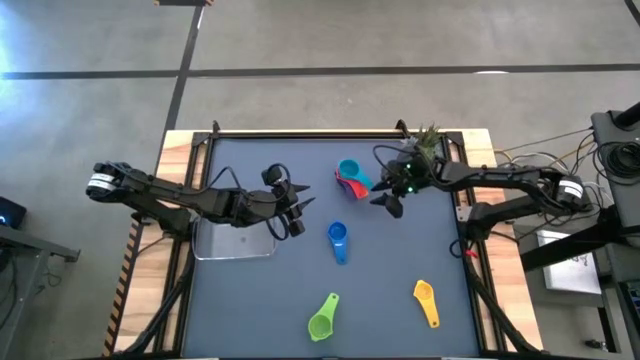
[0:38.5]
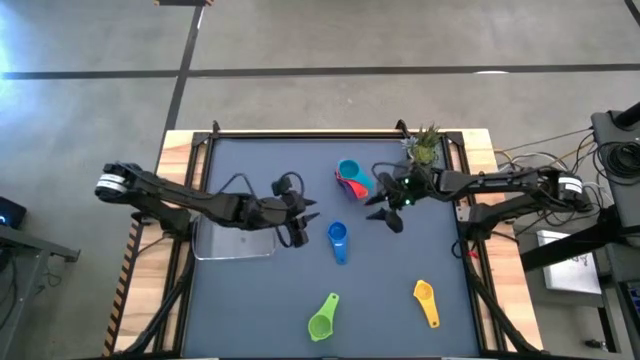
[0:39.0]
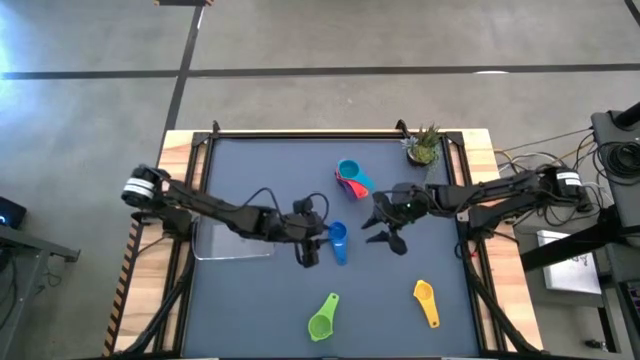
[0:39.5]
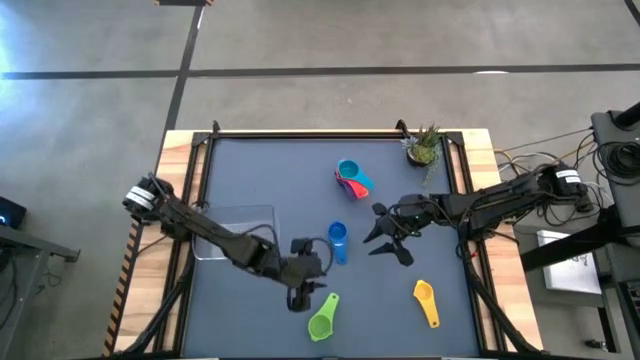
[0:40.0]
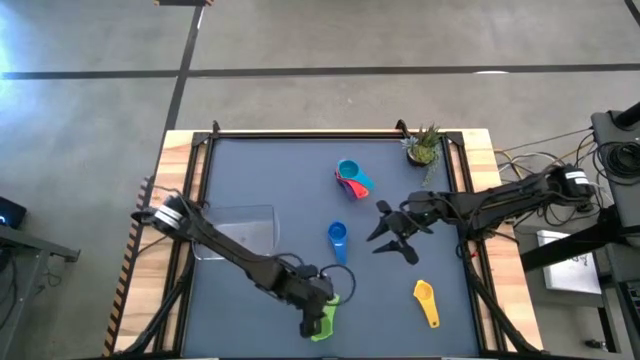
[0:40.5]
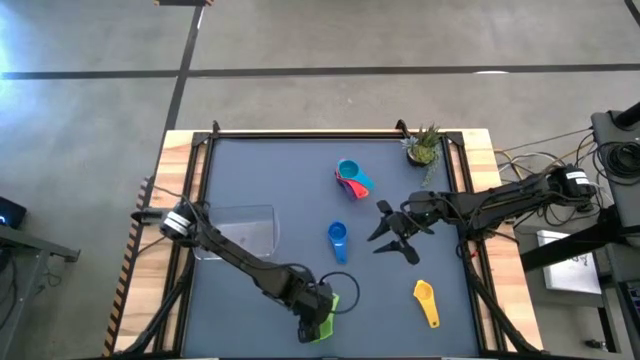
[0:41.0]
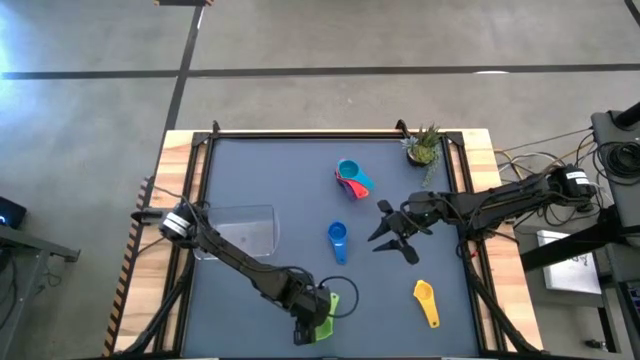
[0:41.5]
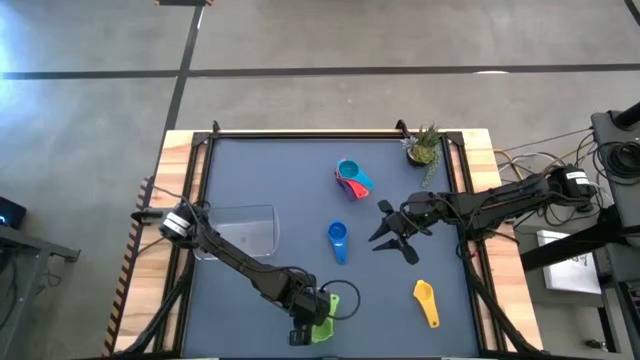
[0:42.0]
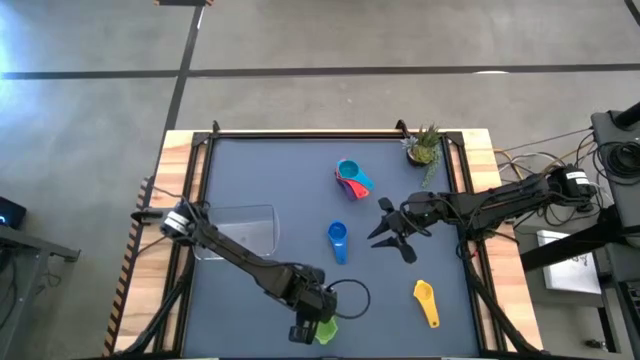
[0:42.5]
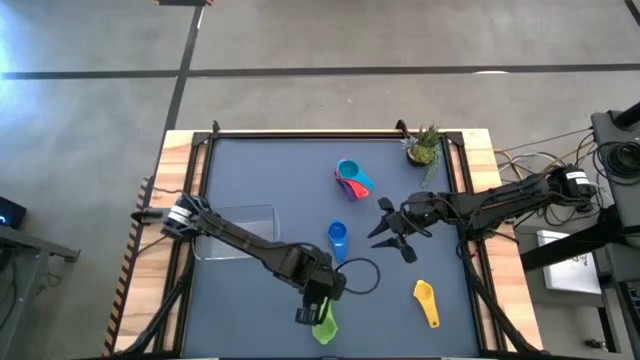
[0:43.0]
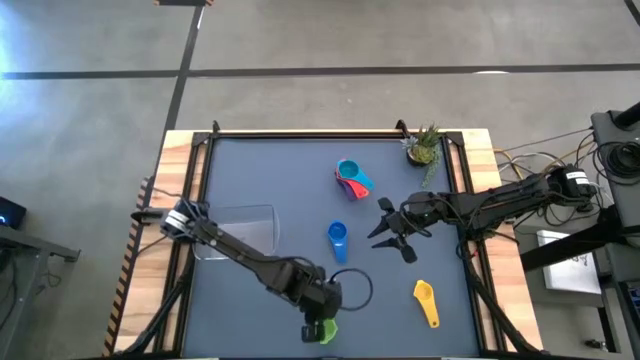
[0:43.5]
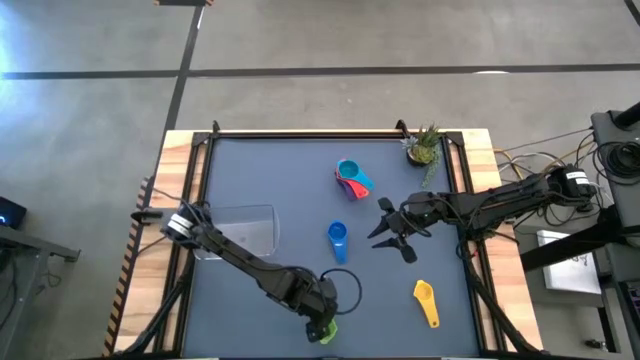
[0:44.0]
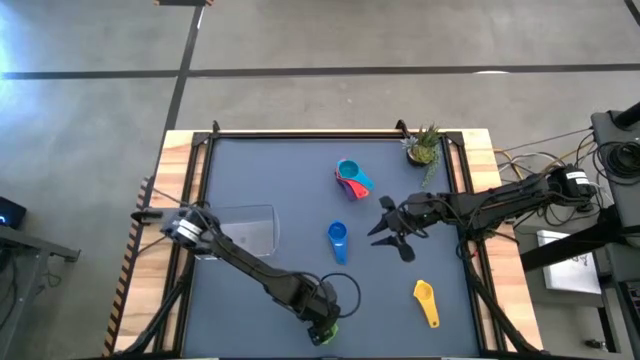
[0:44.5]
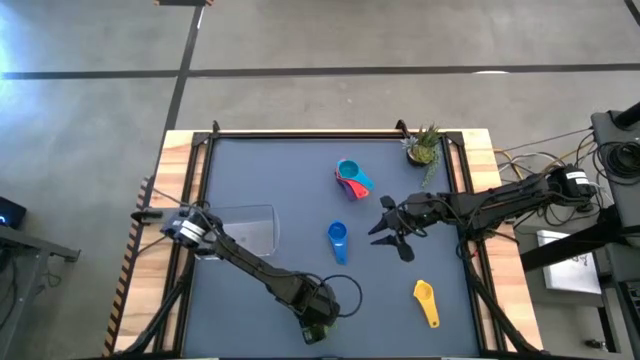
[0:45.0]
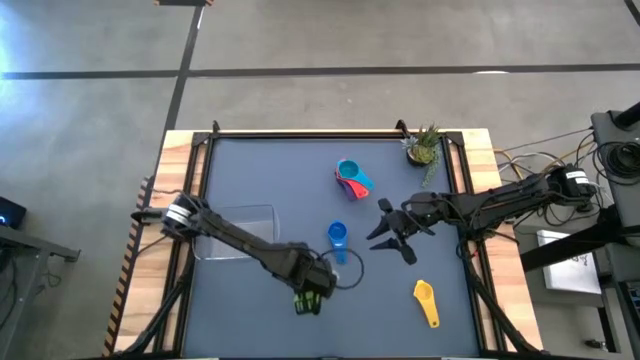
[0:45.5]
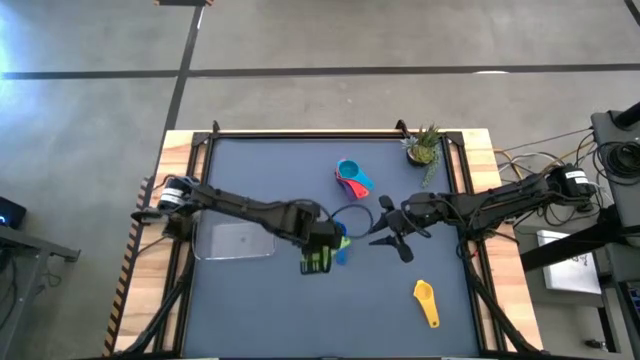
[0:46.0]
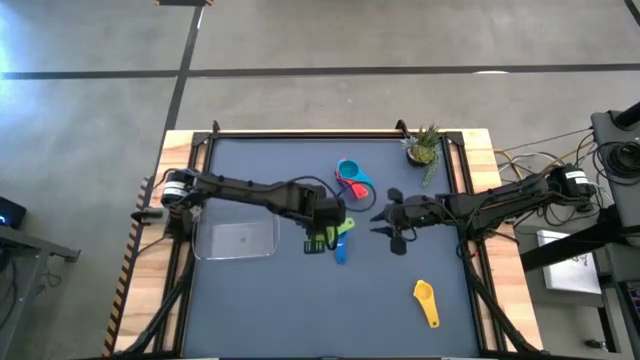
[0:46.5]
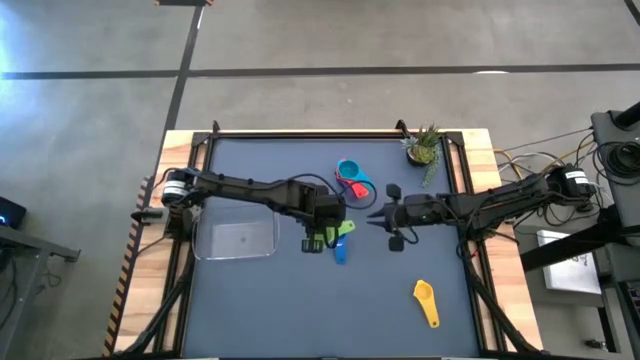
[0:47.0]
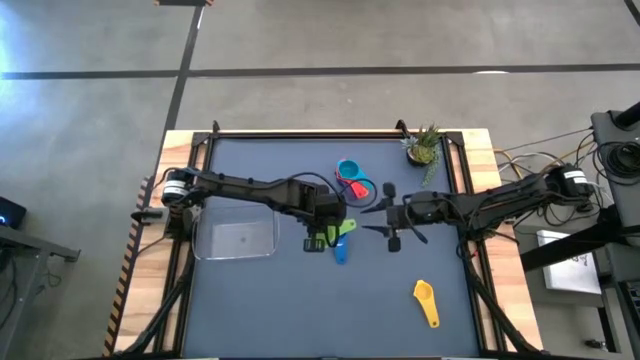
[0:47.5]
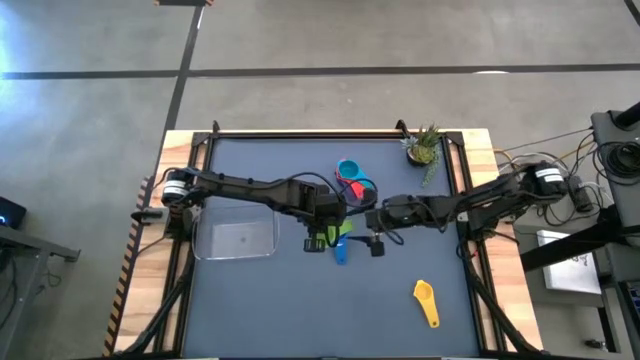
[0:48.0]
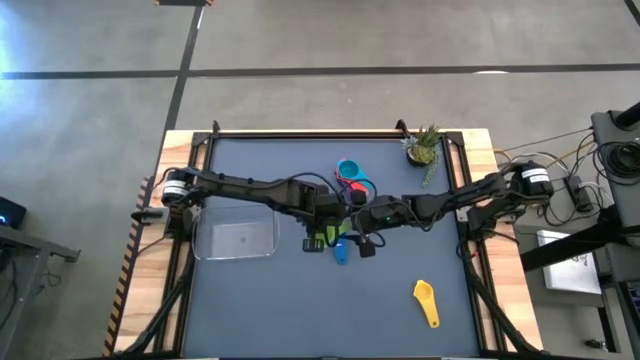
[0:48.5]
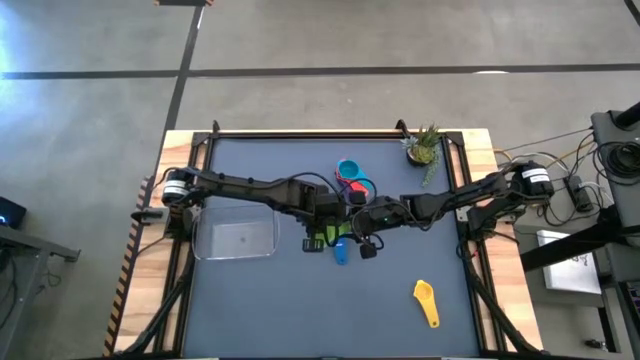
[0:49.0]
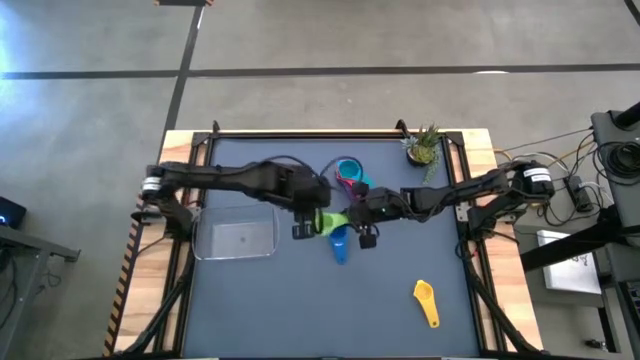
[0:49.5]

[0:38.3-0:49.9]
Task: Nest measuring cups in basket
Stack the green measuring cup on top of the light blue measuring cup

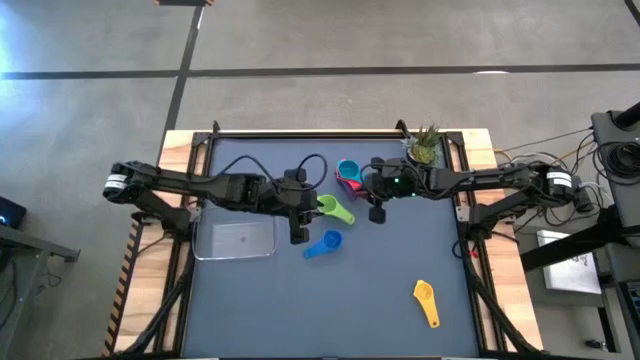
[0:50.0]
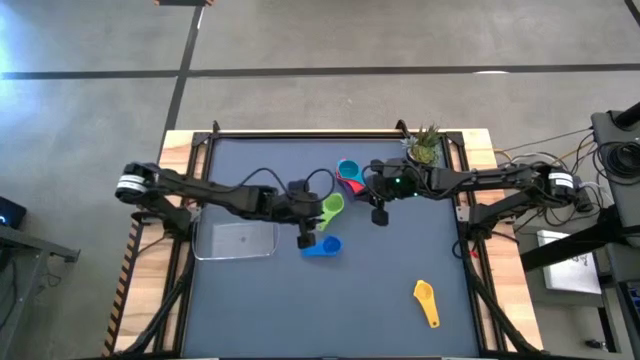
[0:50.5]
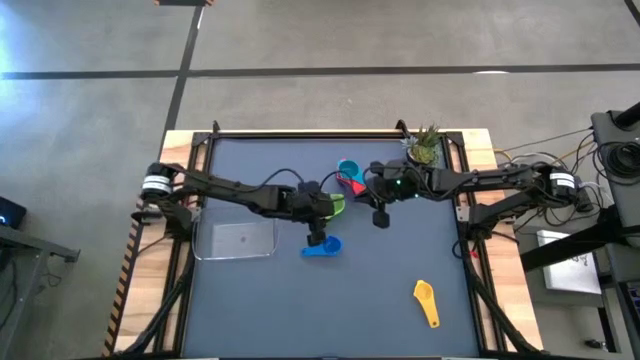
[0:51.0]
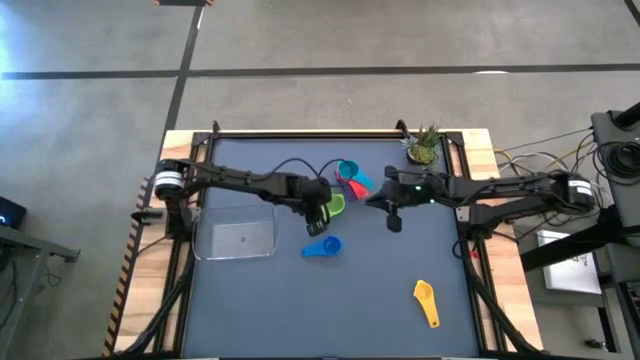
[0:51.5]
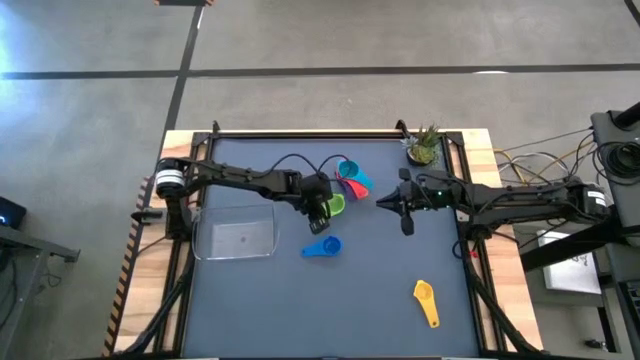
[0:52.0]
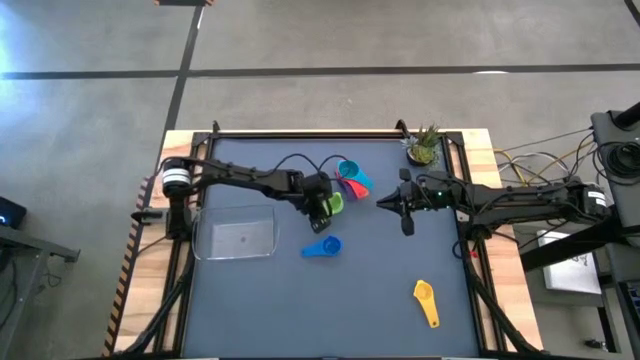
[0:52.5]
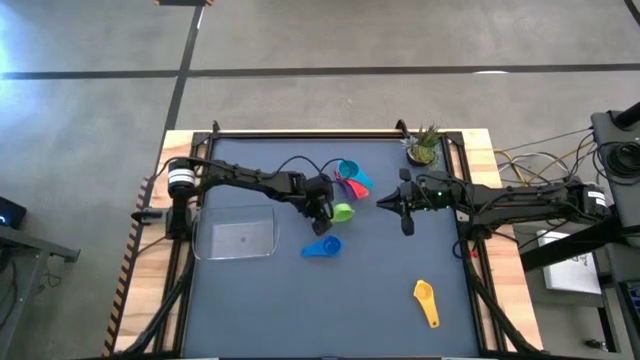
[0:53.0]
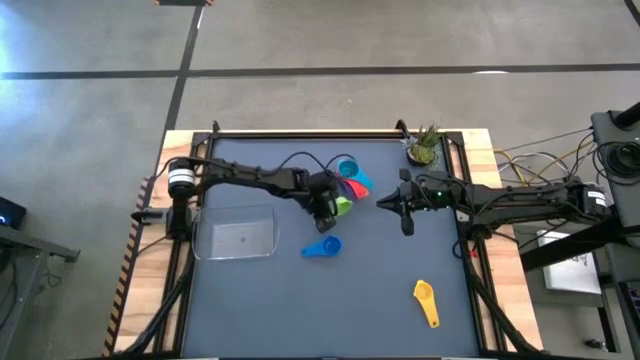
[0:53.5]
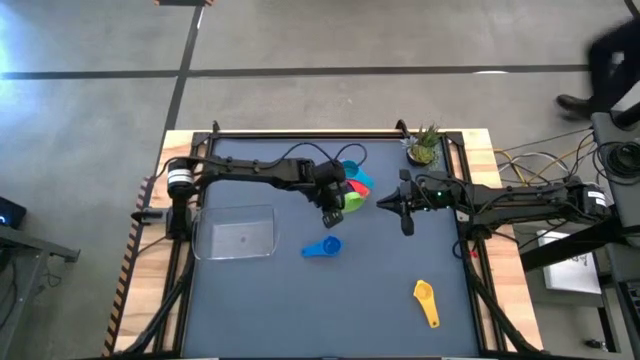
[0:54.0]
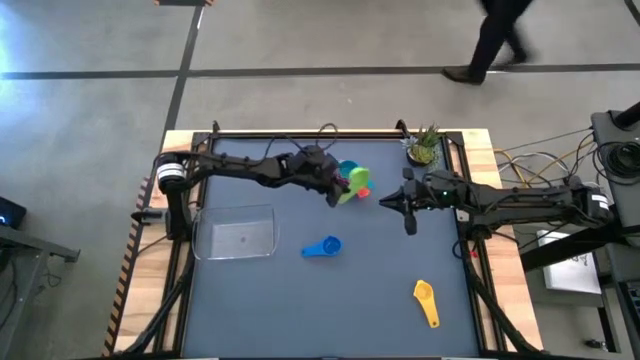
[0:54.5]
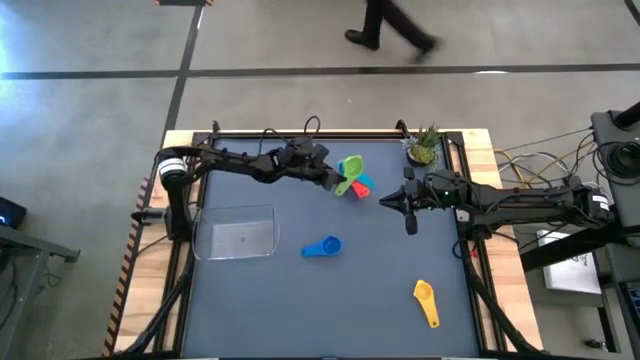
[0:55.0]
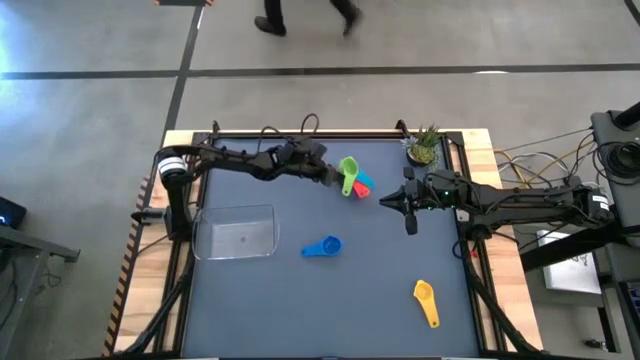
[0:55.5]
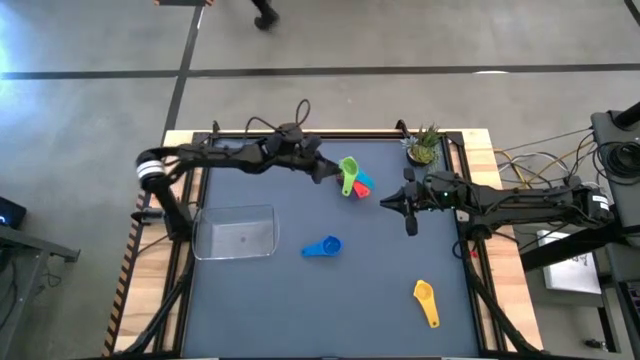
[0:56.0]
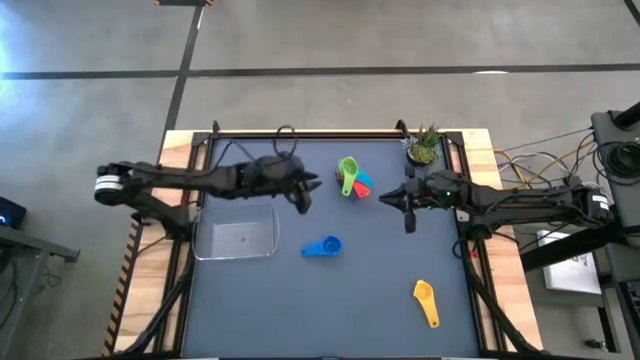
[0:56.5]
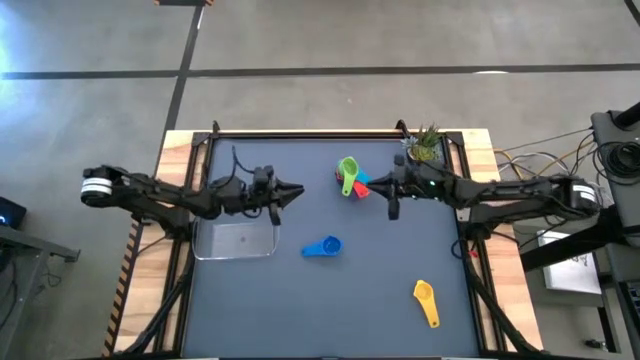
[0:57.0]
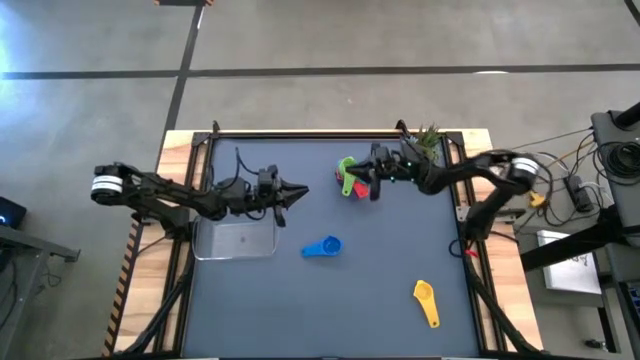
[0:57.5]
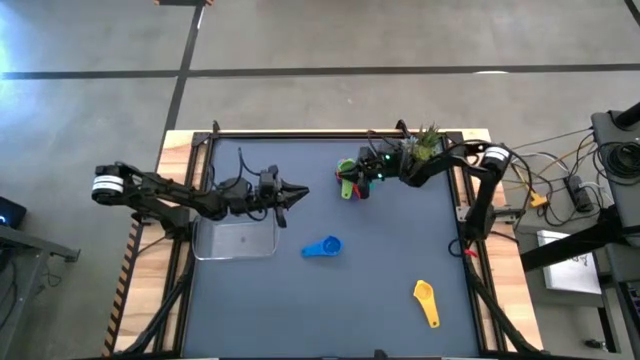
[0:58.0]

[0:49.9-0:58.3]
Stack the green measuring cup on top of the light blue measuring cup
